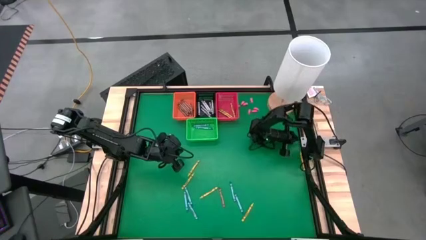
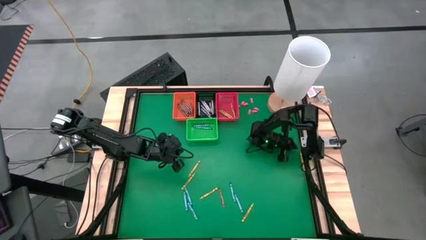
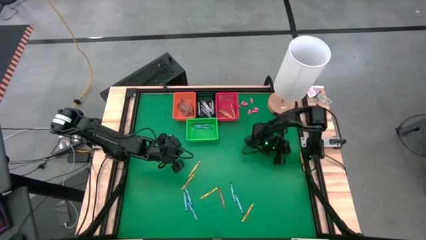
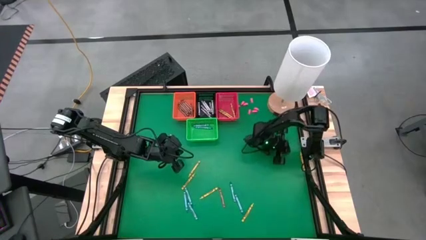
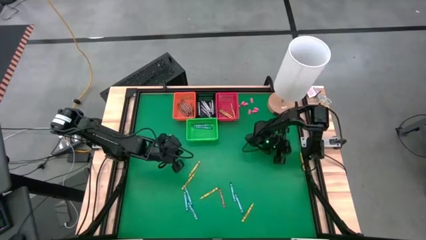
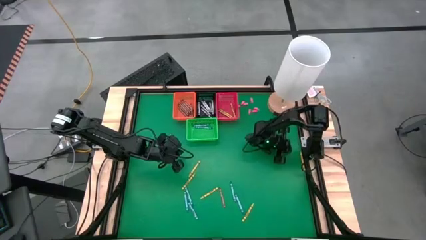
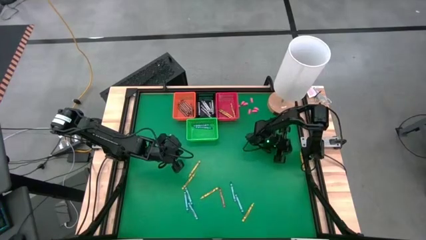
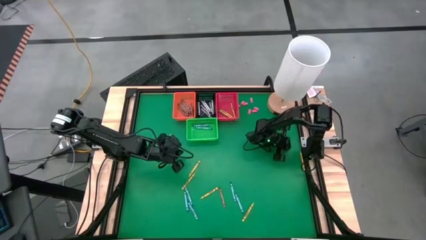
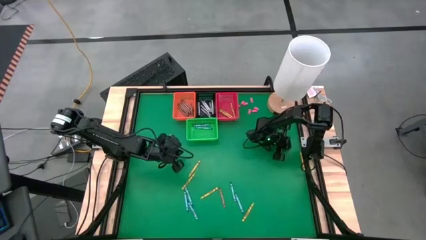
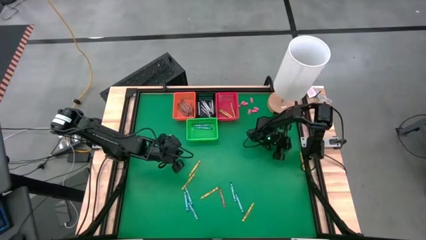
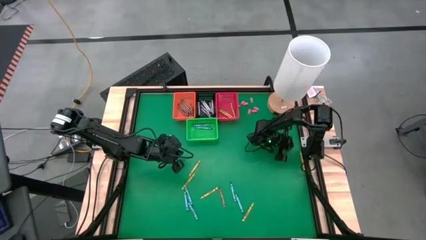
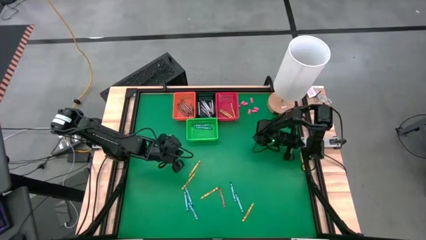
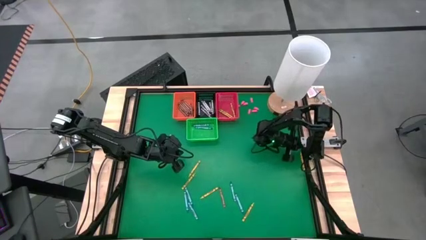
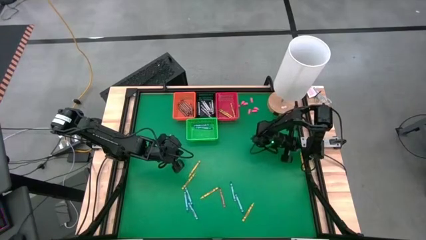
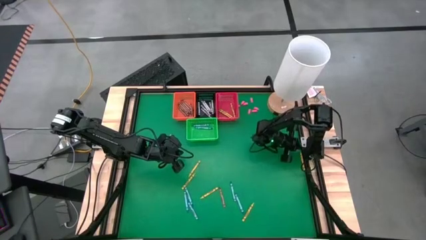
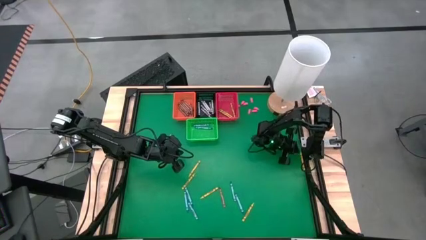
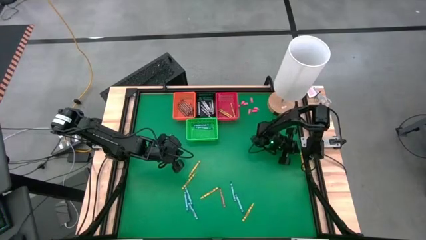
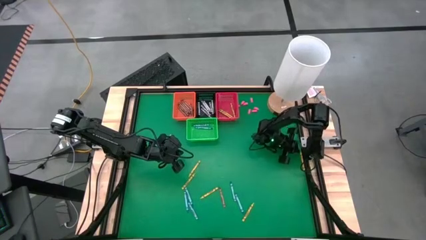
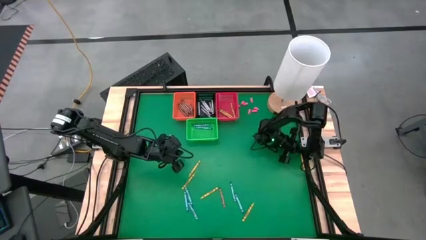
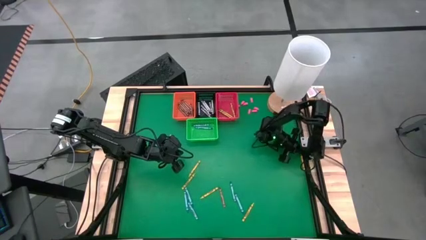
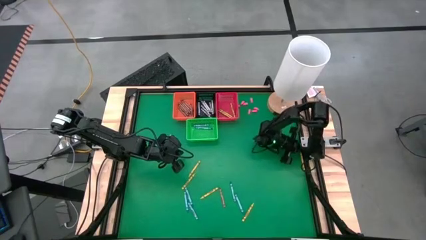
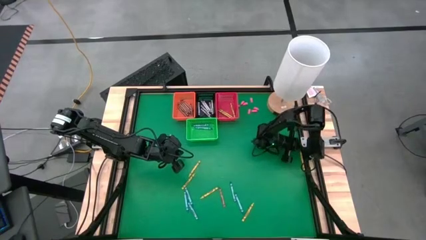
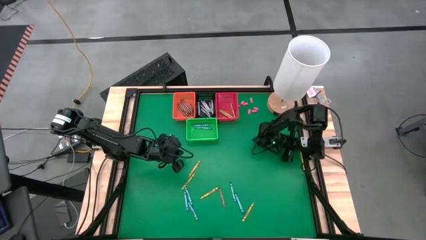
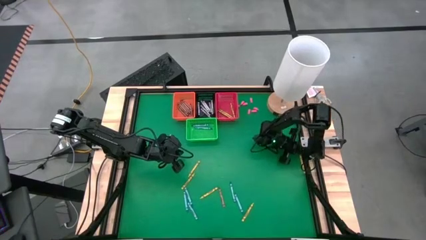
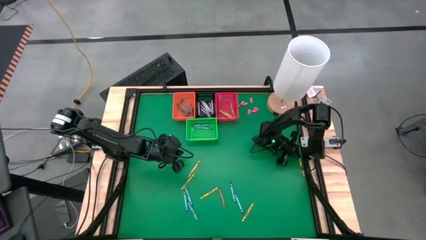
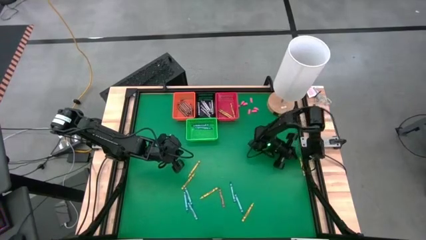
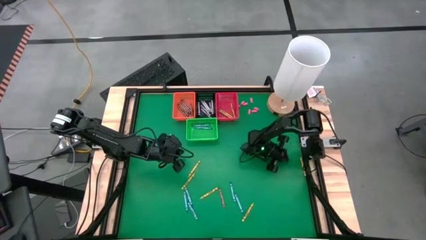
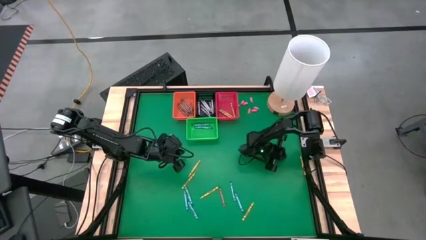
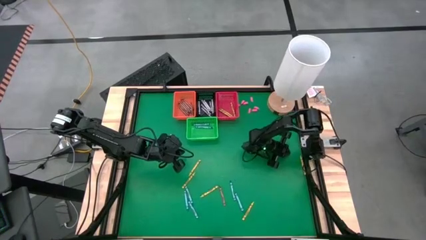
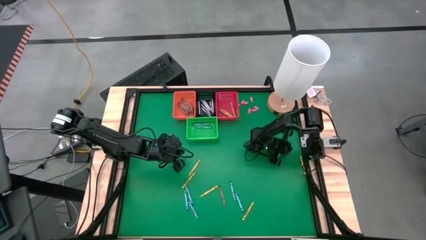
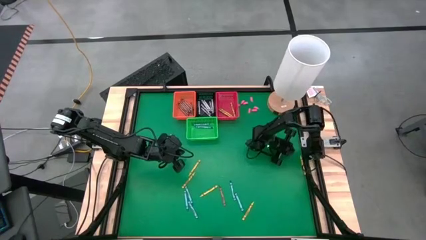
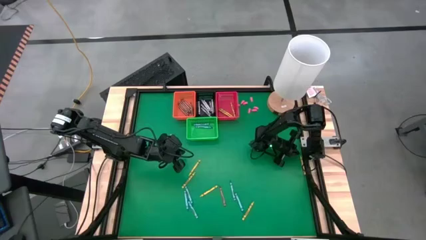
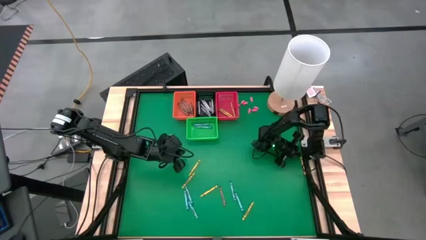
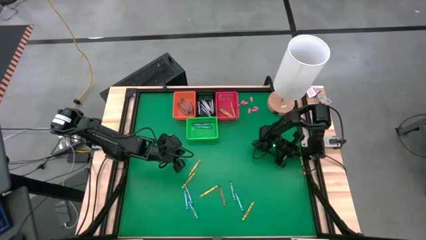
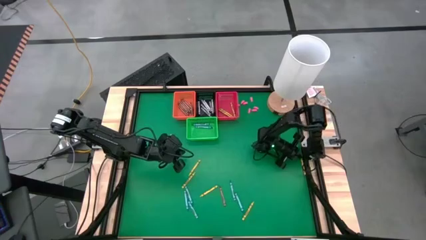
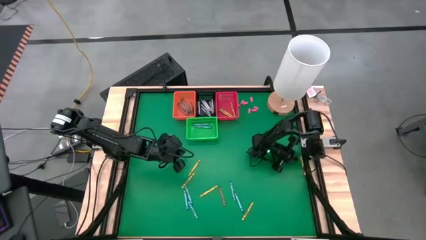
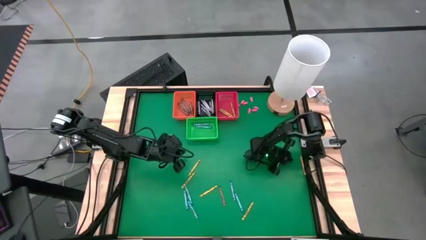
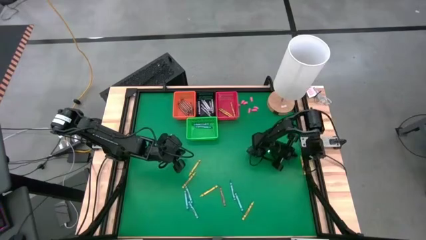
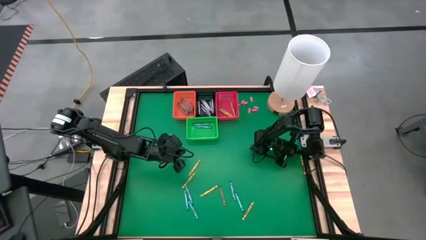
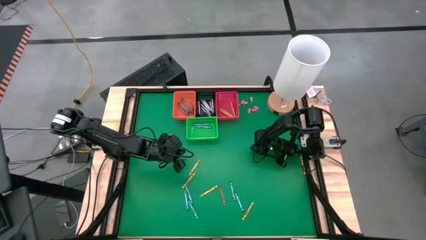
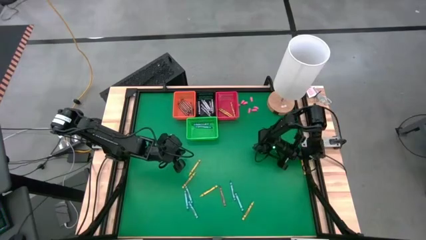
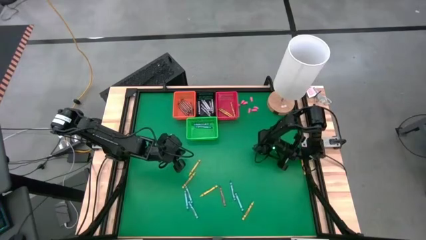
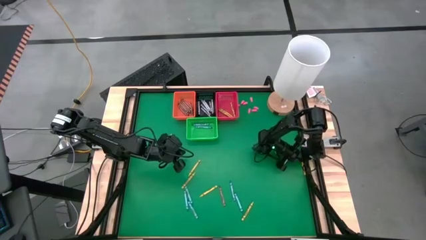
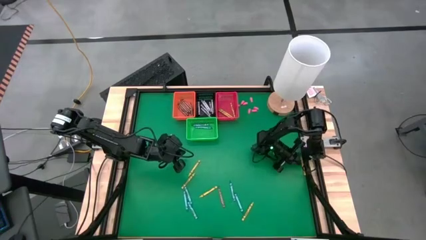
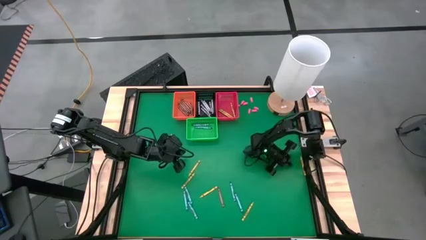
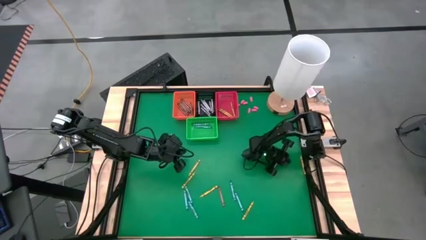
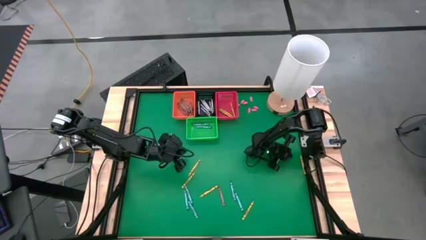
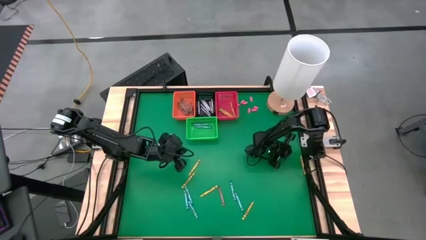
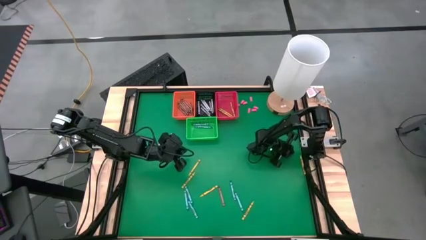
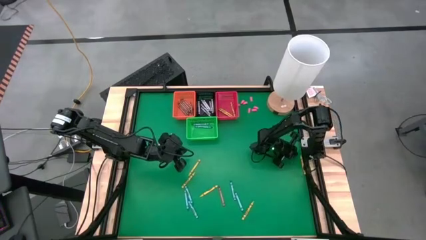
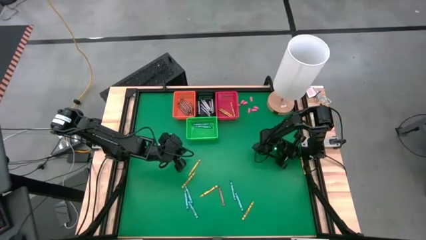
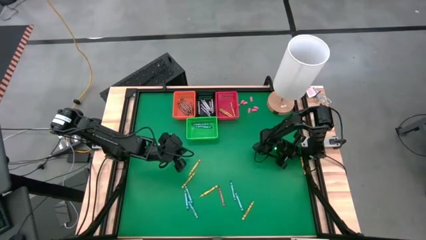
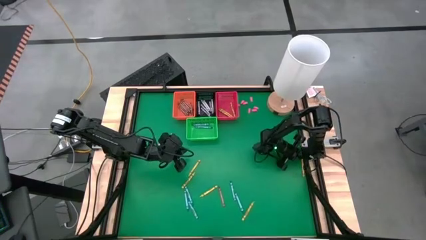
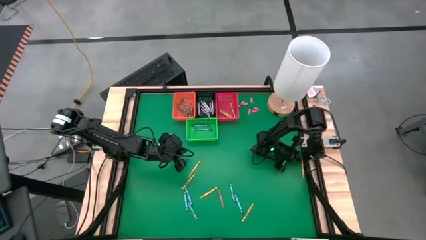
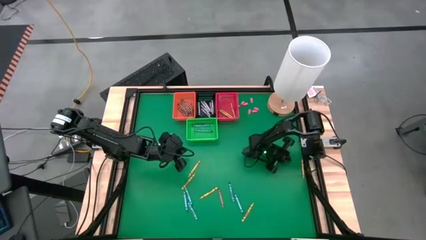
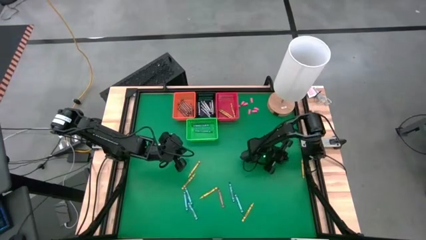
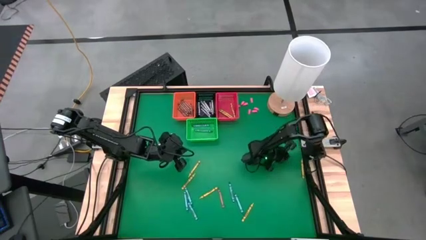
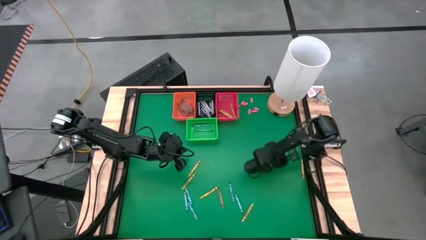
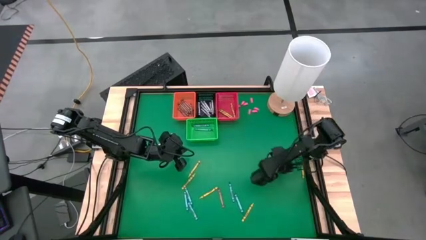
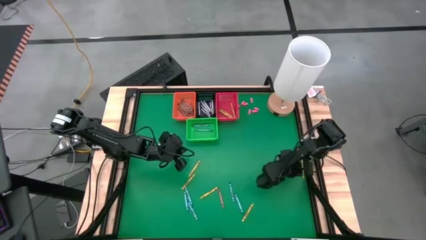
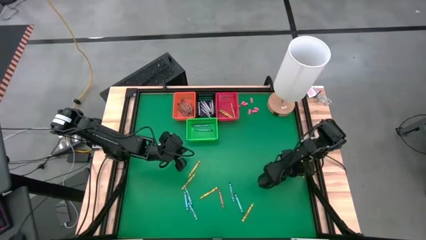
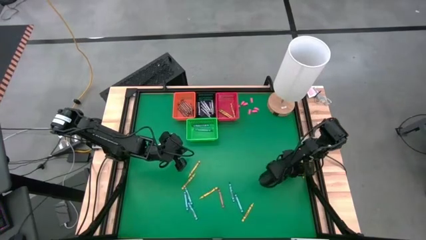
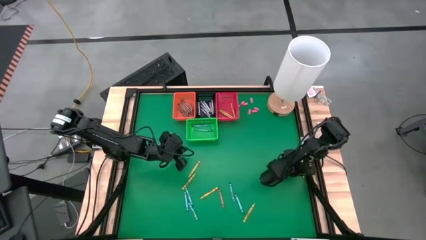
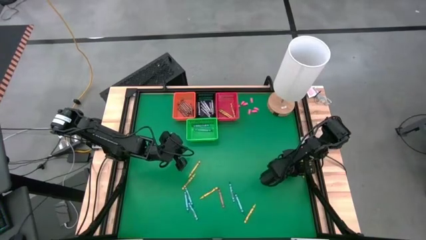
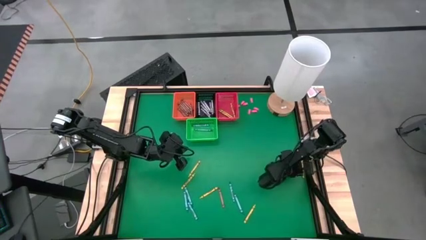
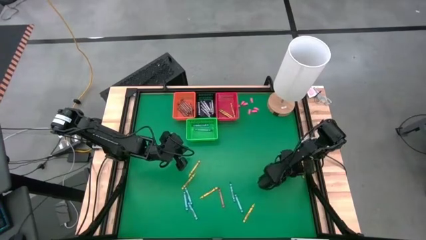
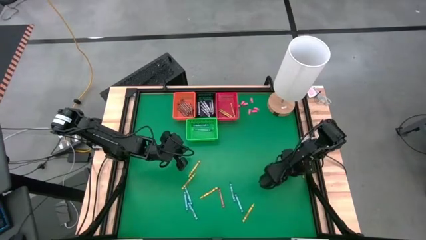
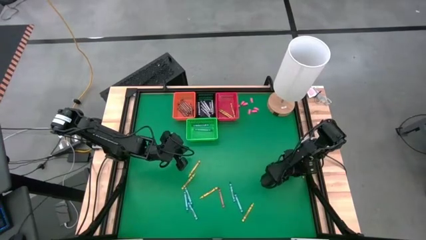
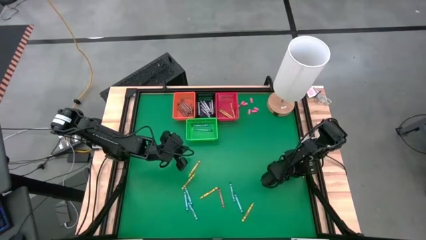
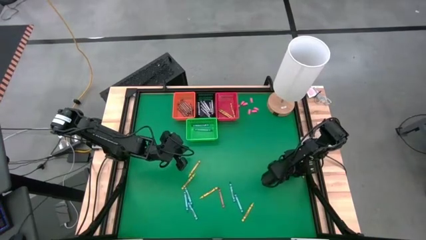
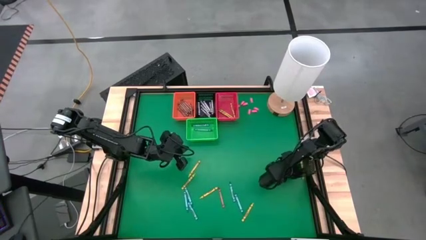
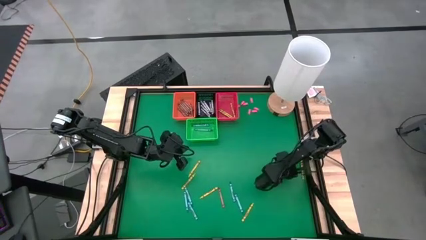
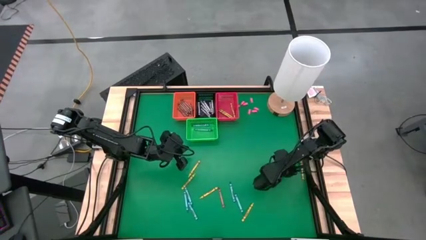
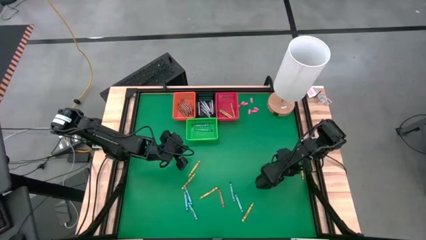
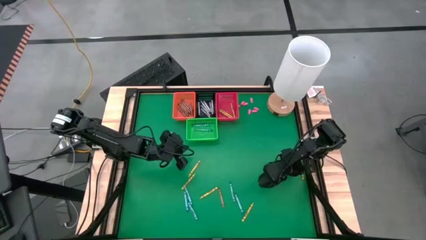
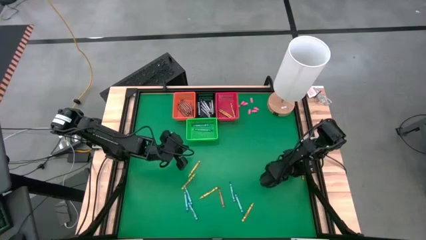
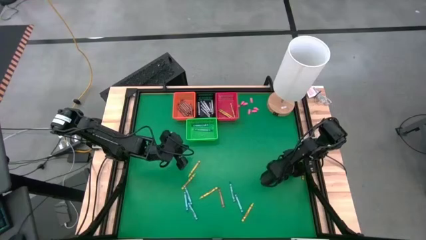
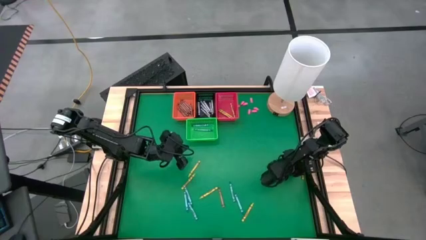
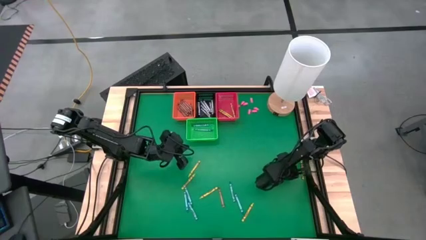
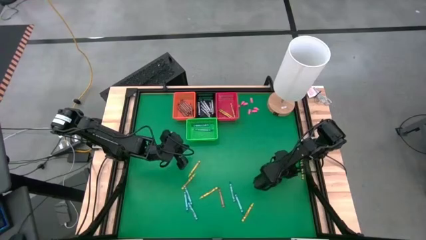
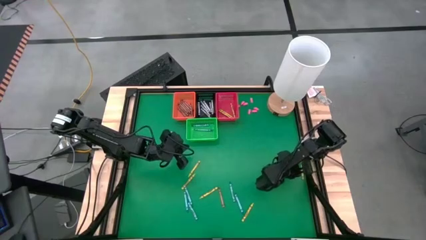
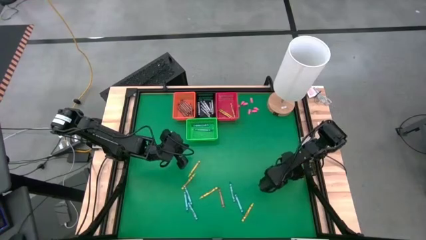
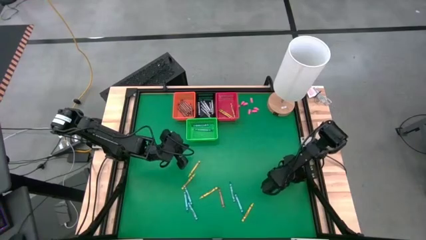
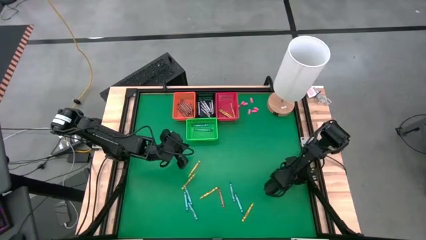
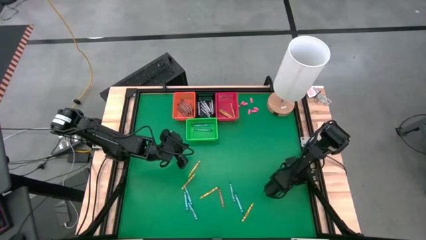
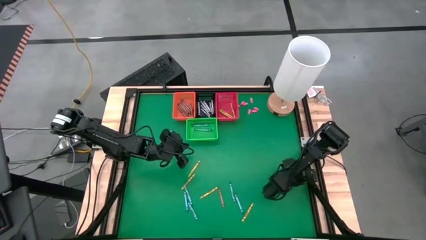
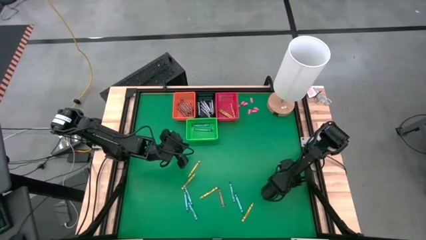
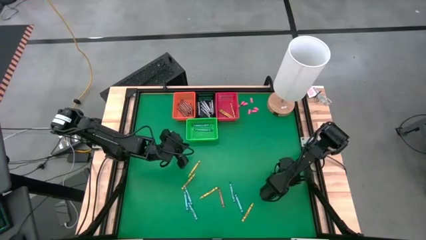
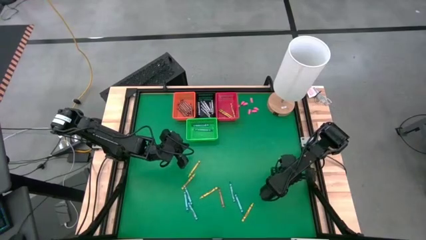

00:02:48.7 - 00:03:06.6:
Task: Sort crayons
Put a black crayon in the black basket
